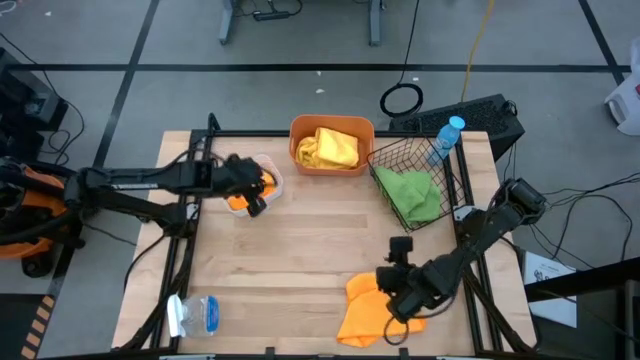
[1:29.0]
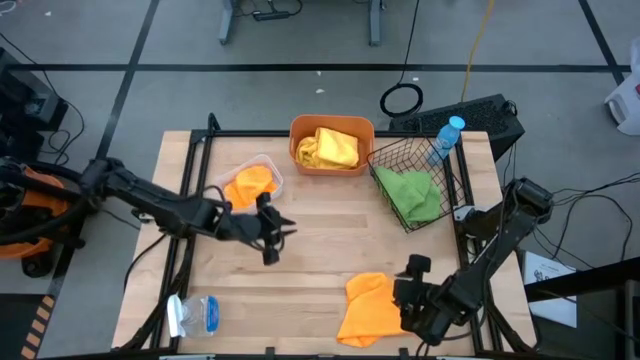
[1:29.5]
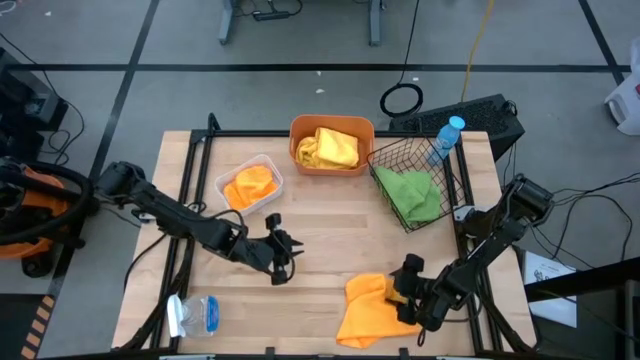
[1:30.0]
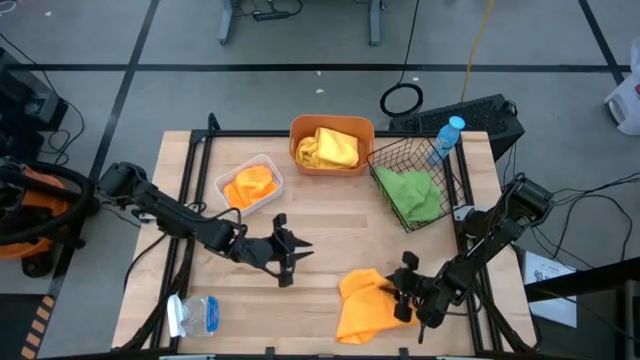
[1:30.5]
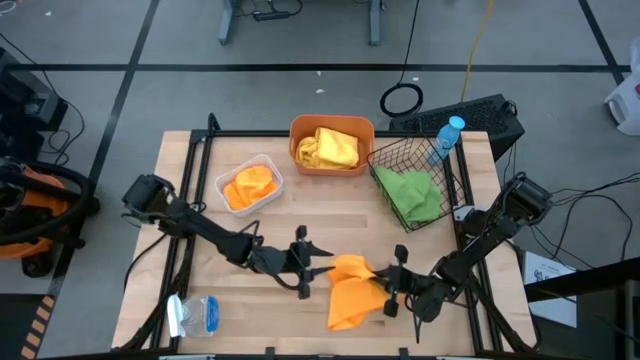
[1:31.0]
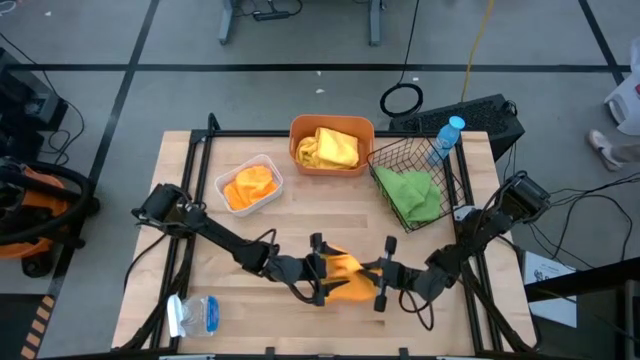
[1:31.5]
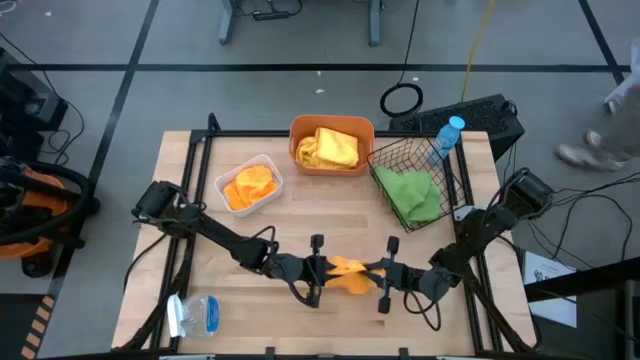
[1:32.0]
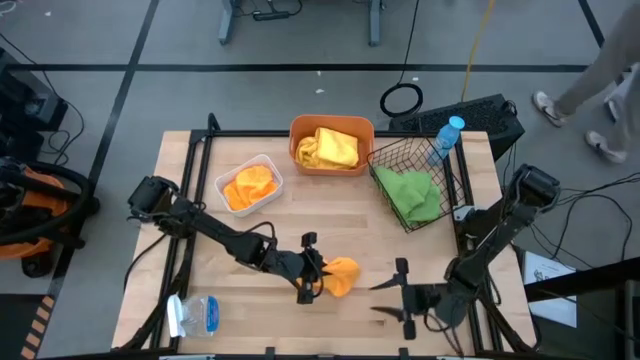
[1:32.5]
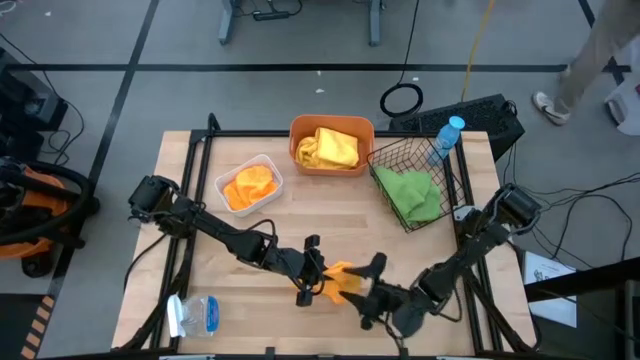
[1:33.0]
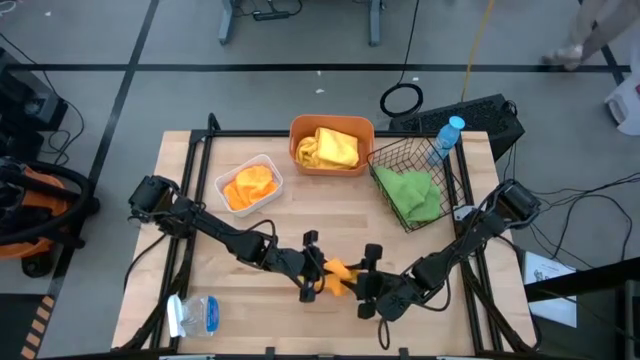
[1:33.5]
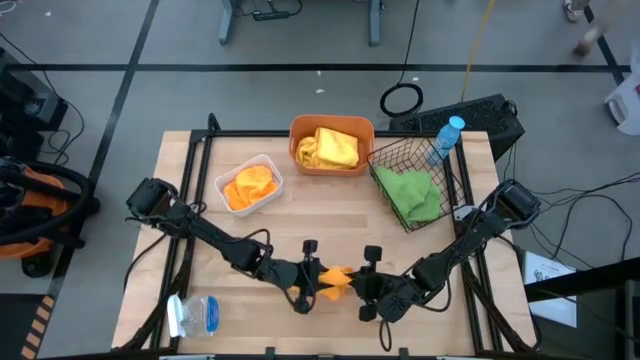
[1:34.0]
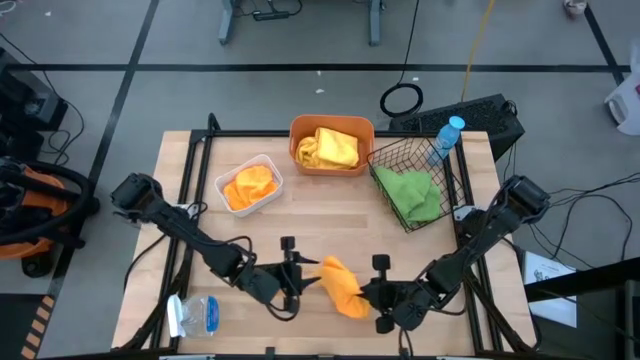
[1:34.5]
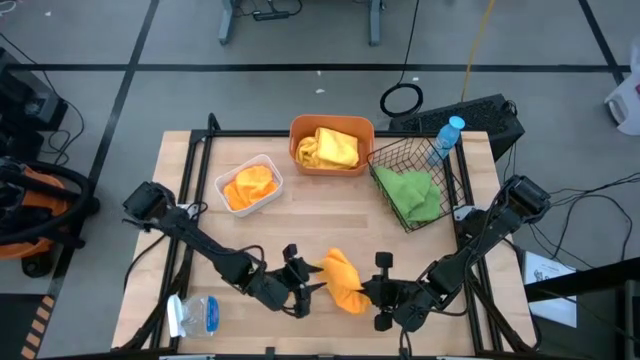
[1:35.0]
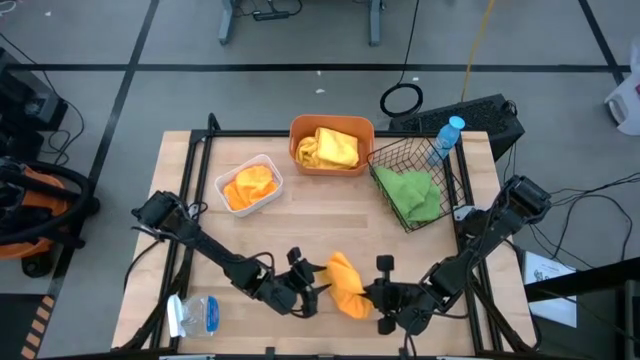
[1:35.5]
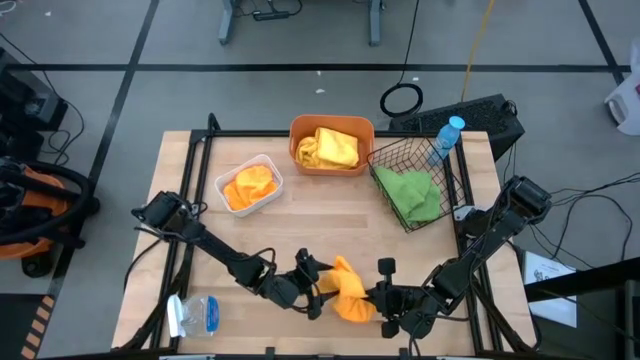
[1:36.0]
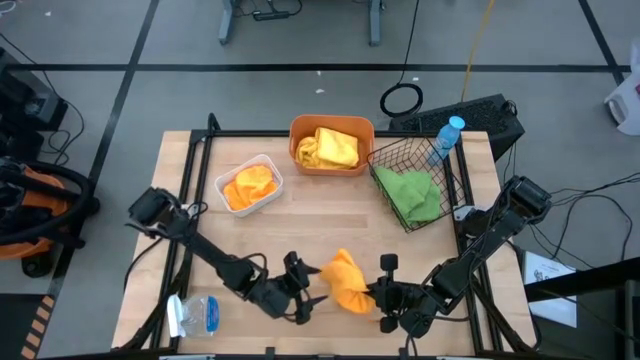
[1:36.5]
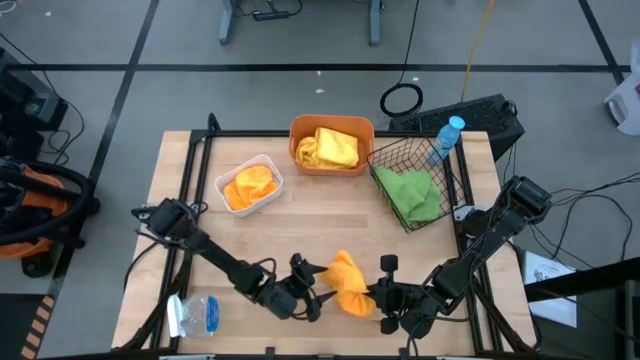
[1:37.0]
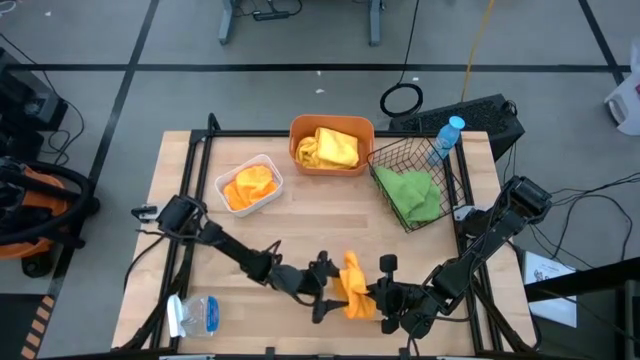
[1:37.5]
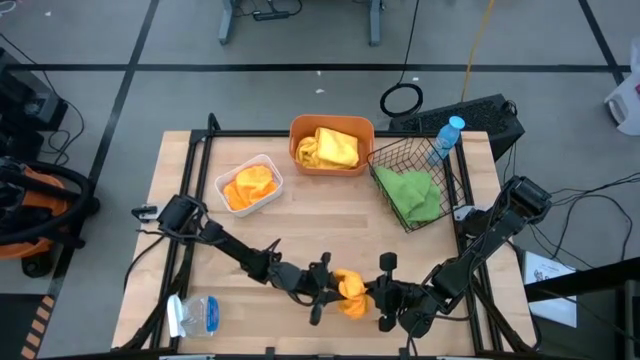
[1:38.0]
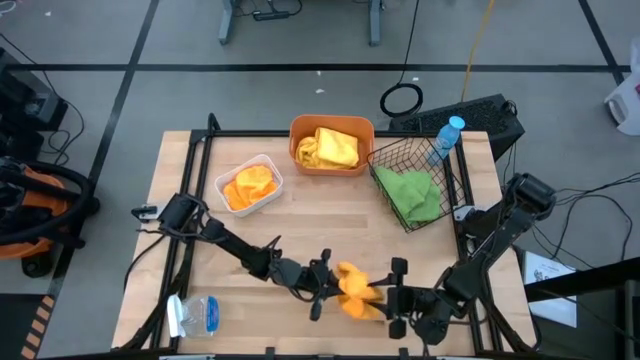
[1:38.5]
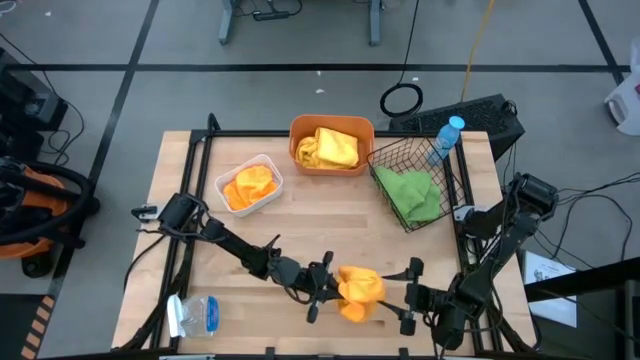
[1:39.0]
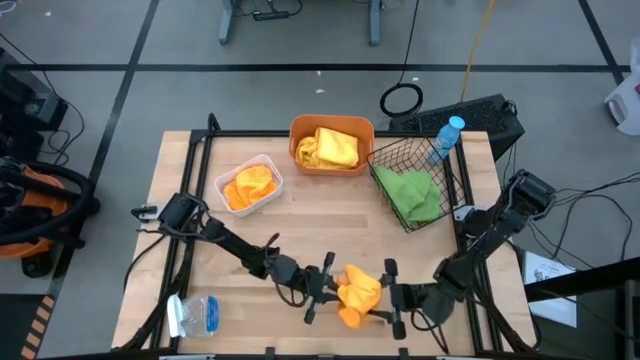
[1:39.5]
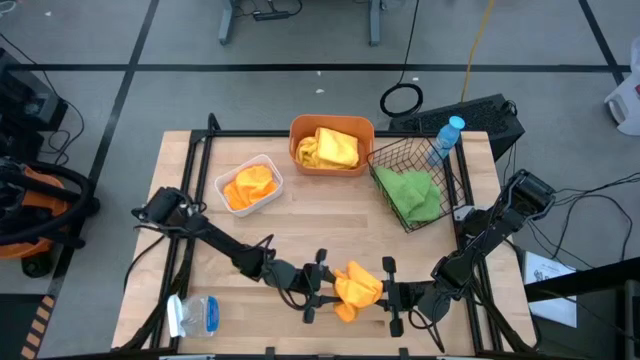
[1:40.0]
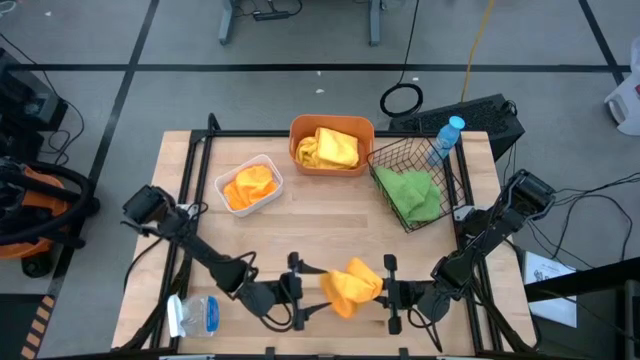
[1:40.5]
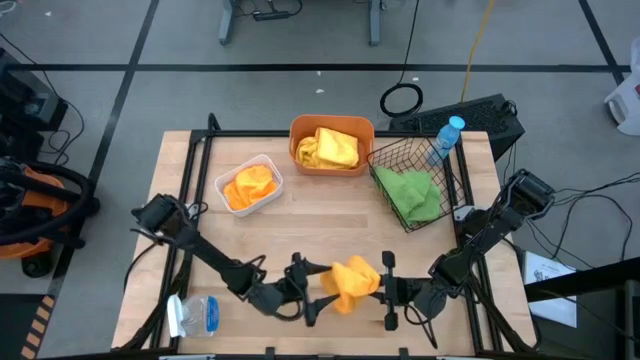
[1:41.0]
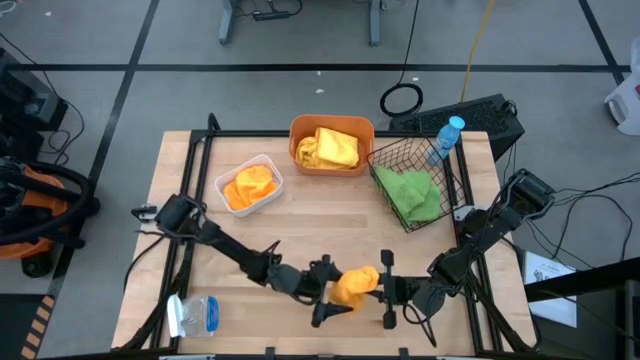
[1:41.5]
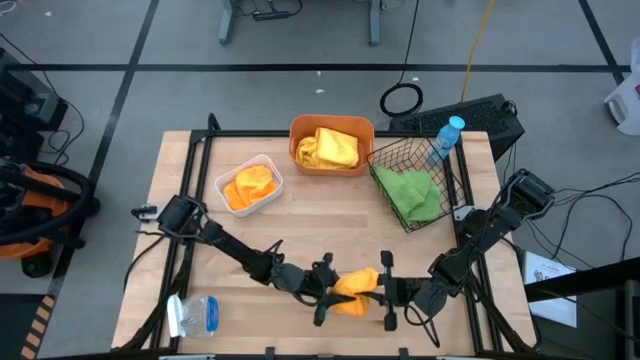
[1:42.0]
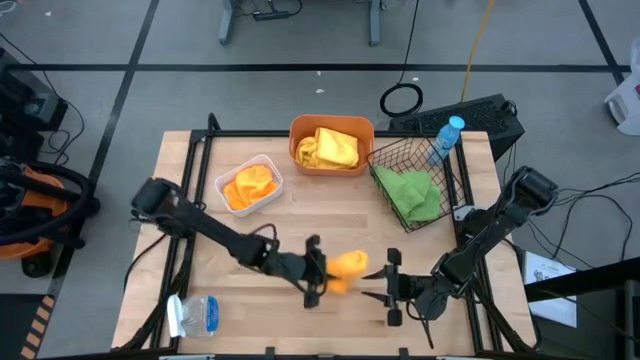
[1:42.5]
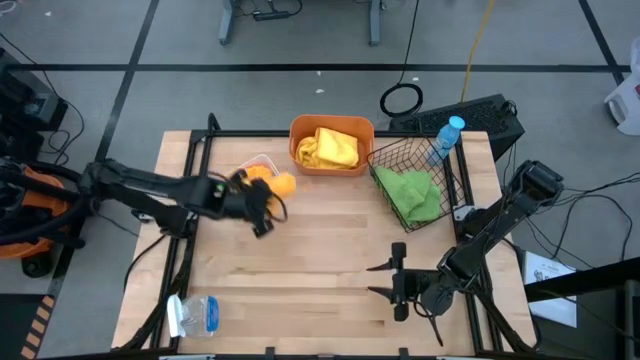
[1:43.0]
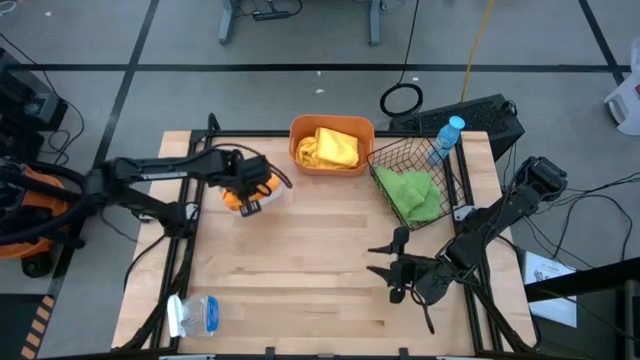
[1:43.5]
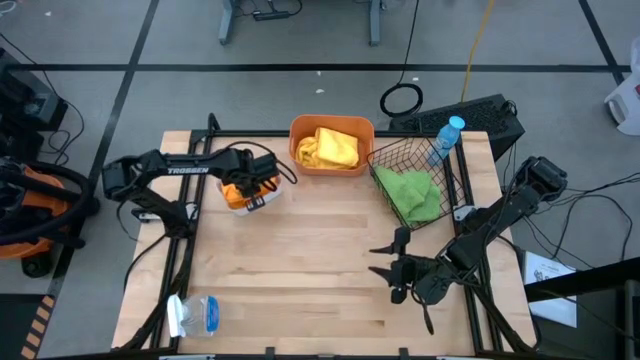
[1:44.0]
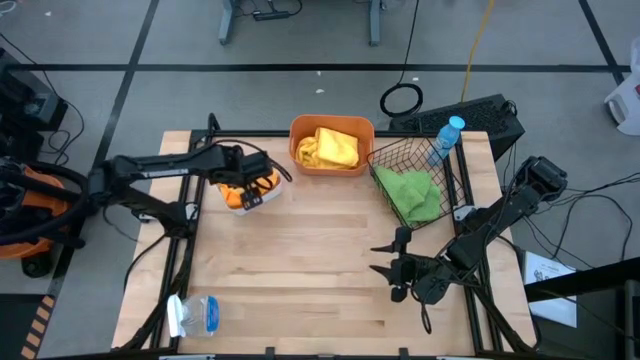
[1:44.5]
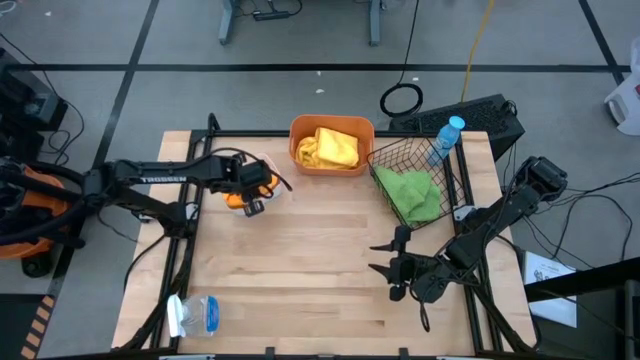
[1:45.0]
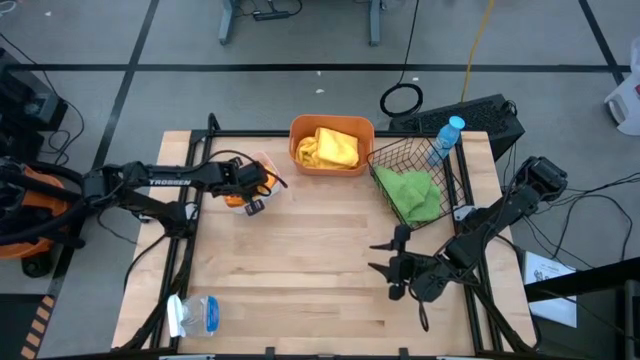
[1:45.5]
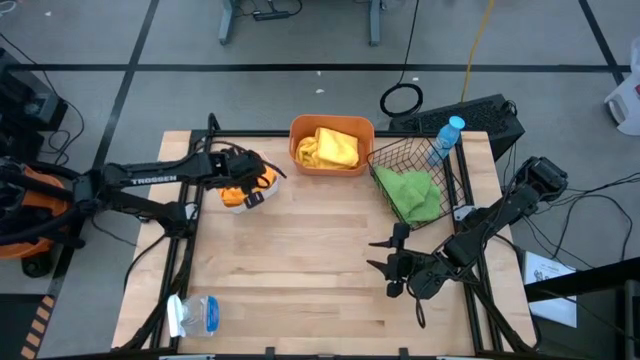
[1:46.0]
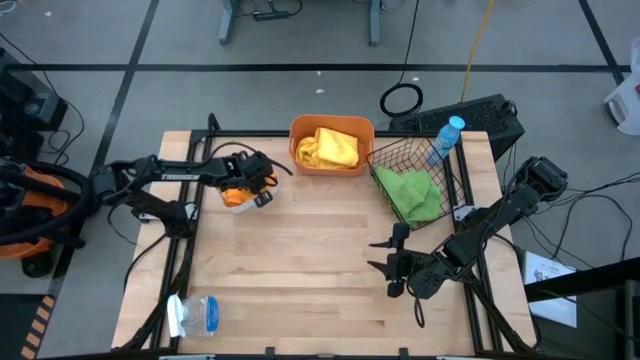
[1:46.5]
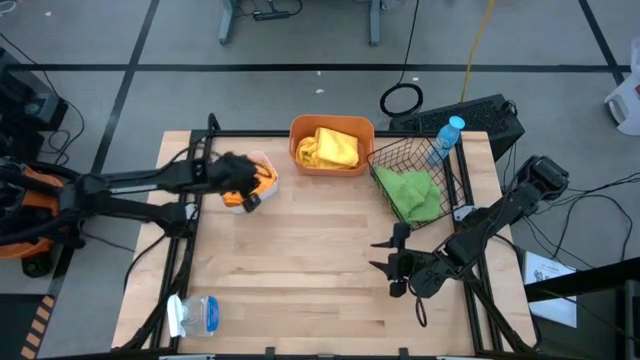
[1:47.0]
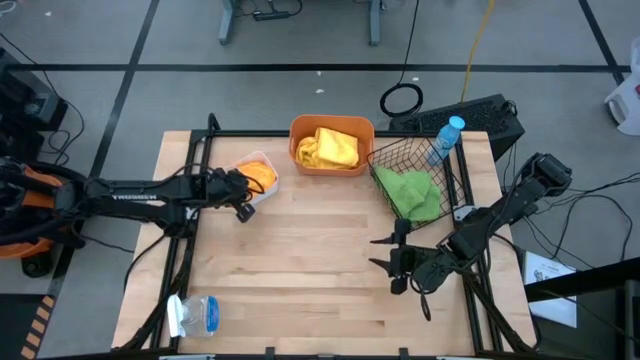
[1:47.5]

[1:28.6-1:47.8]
Task: Sort microfiber towel by color & place in baskets
Put the orange towel into the white bin

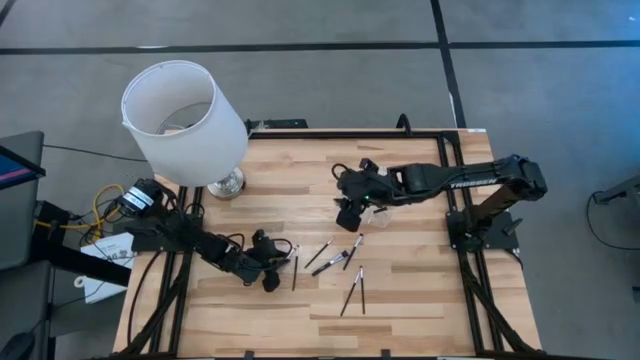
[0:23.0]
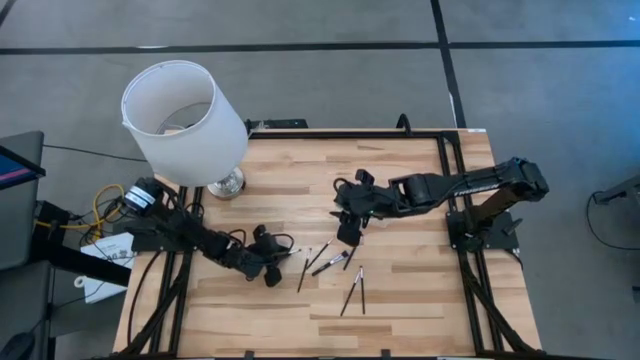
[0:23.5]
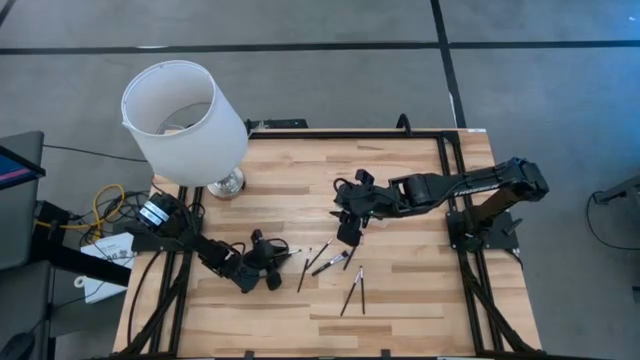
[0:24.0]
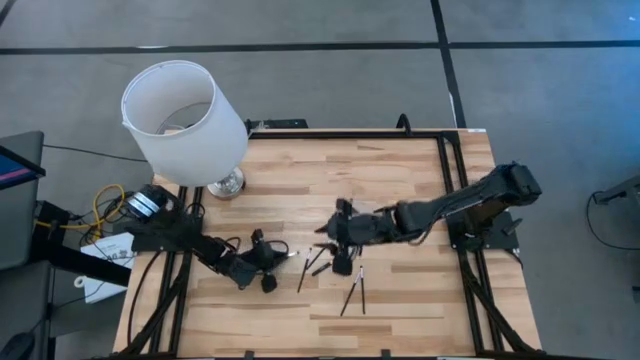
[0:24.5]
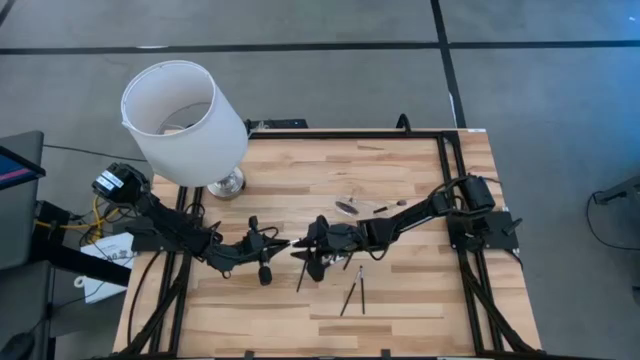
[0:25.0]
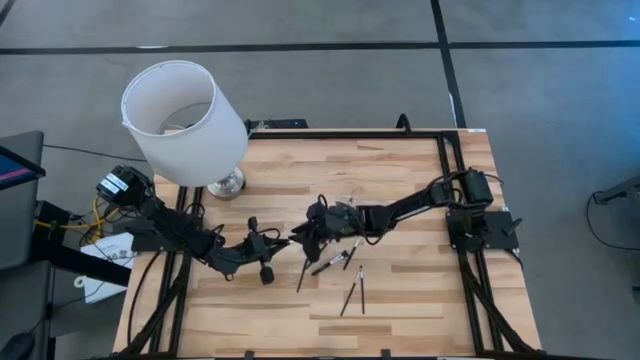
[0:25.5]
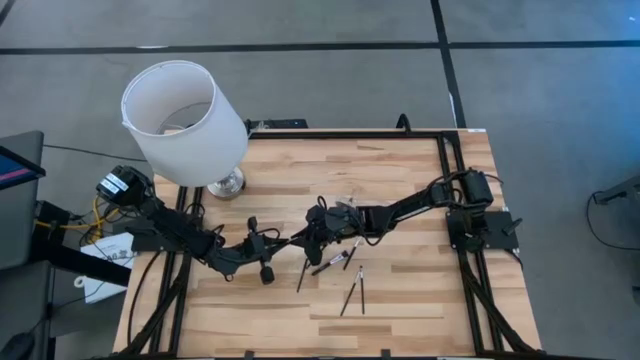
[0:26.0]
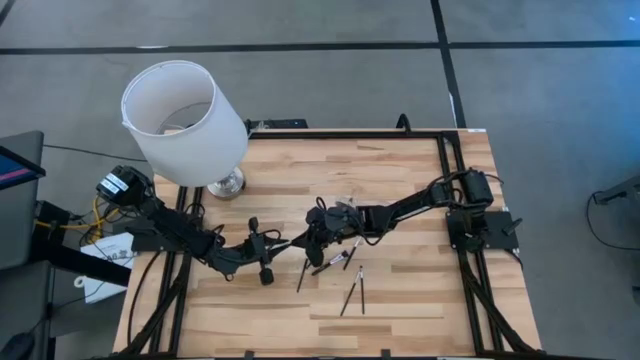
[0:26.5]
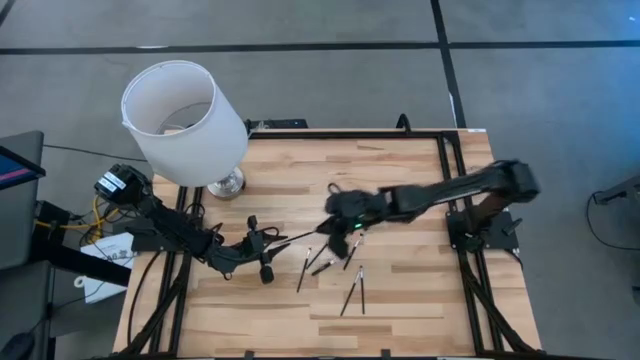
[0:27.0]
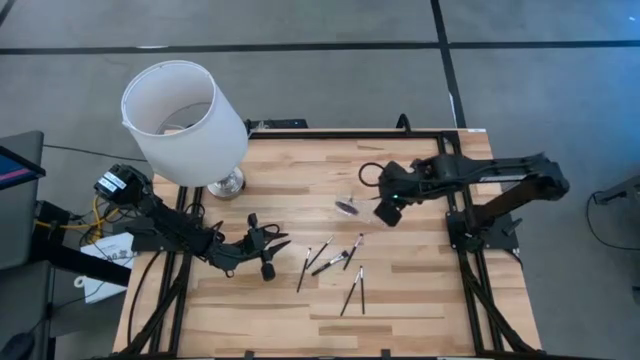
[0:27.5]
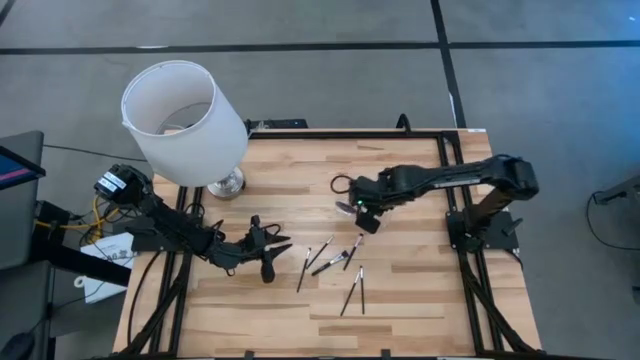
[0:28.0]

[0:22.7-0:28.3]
Task: Put items in baskets/containers
Put the black eyeshadow brush into the transparent organizer
